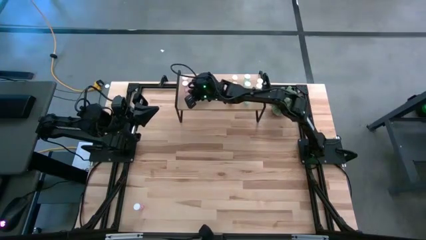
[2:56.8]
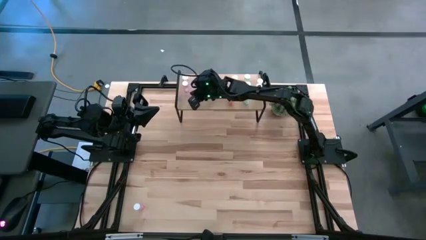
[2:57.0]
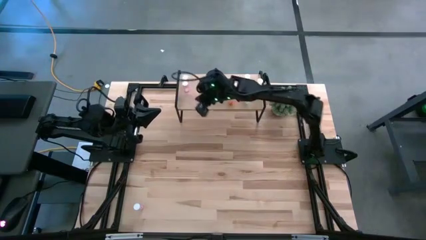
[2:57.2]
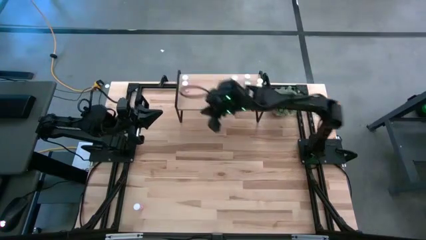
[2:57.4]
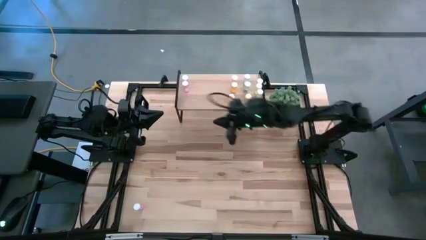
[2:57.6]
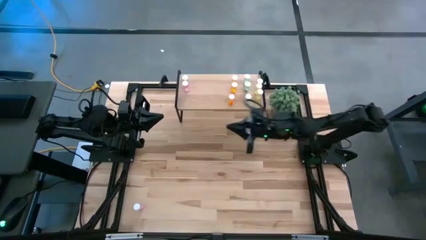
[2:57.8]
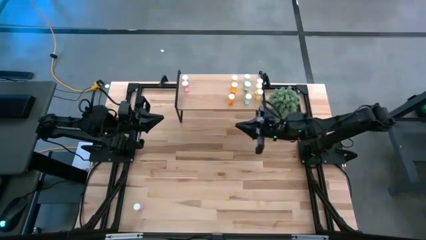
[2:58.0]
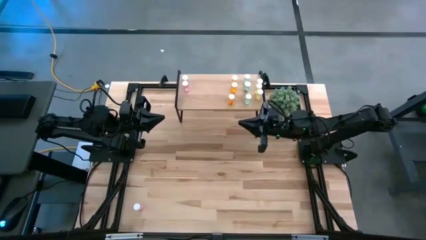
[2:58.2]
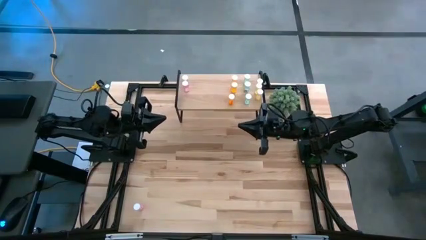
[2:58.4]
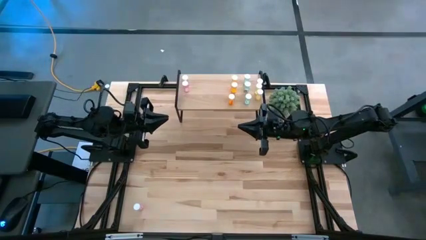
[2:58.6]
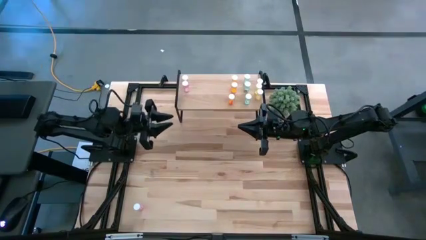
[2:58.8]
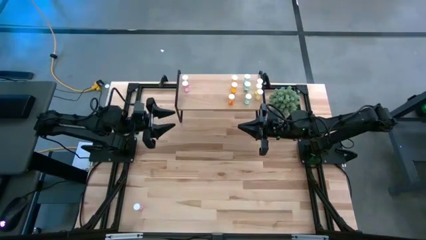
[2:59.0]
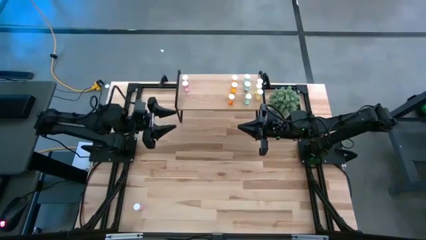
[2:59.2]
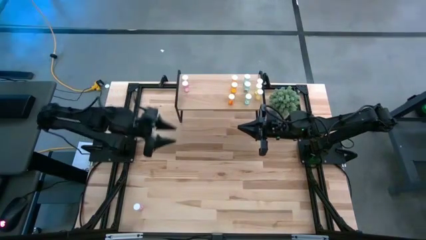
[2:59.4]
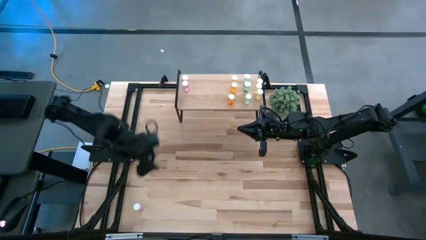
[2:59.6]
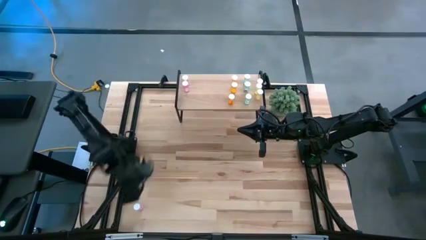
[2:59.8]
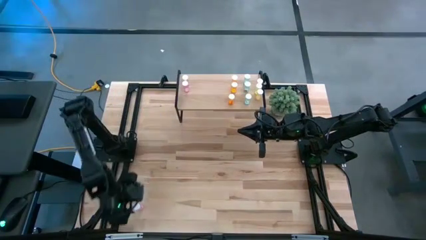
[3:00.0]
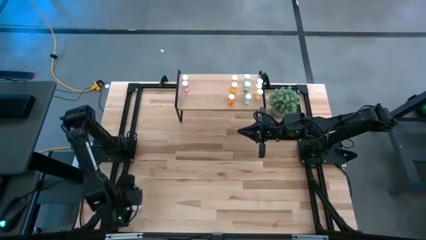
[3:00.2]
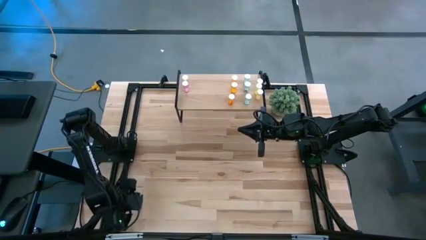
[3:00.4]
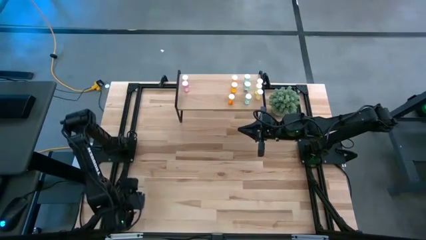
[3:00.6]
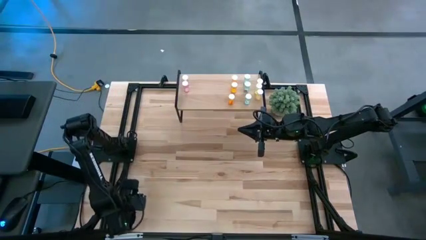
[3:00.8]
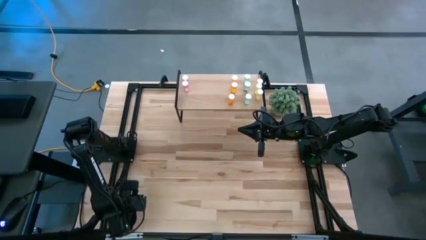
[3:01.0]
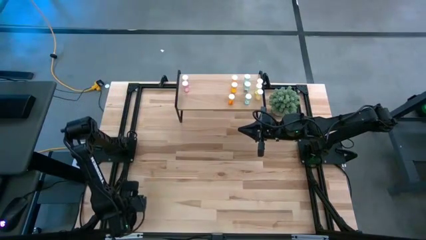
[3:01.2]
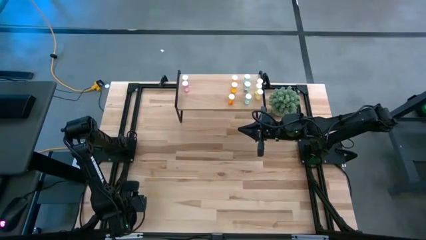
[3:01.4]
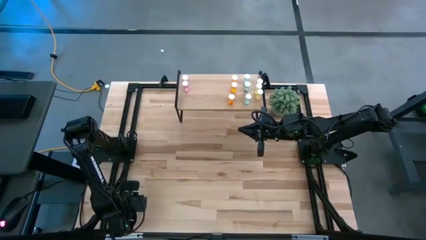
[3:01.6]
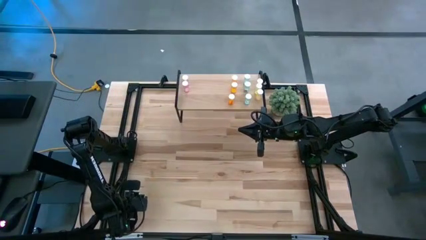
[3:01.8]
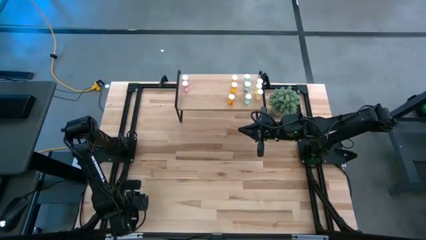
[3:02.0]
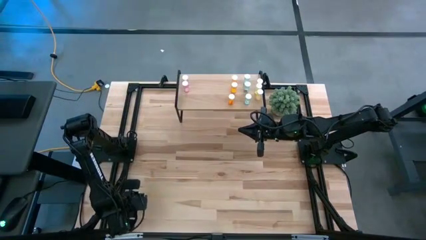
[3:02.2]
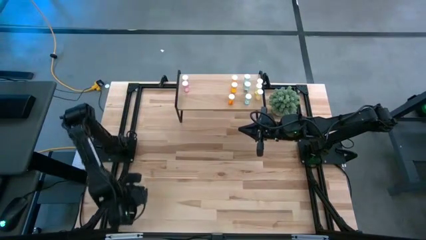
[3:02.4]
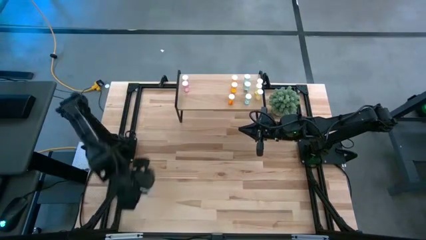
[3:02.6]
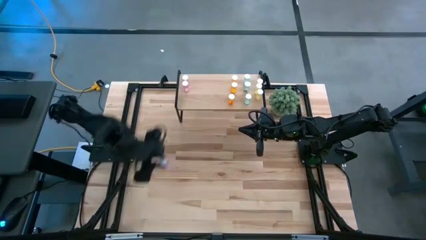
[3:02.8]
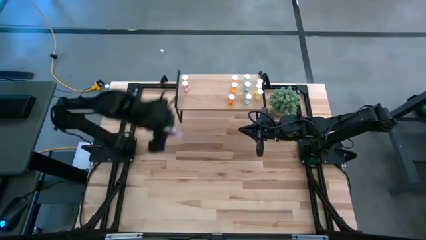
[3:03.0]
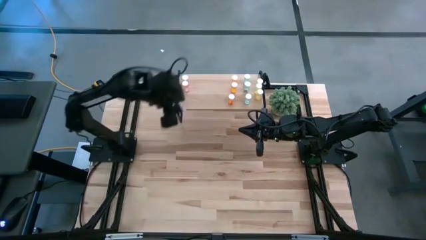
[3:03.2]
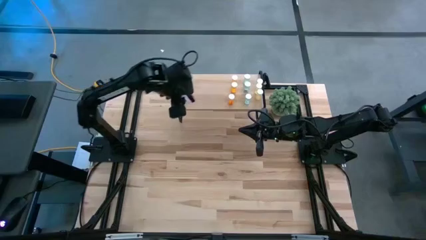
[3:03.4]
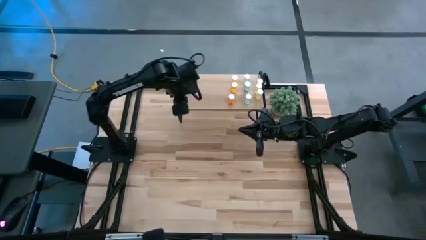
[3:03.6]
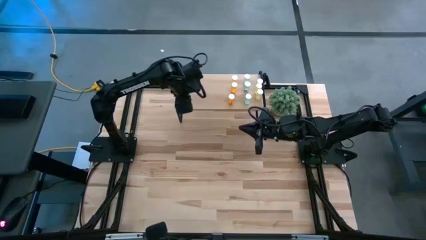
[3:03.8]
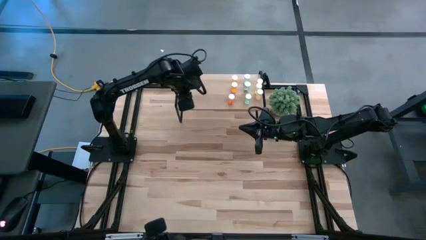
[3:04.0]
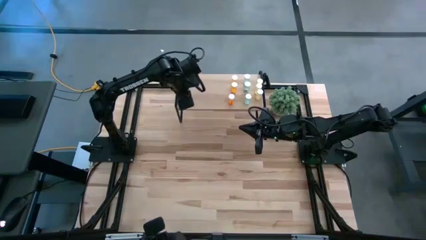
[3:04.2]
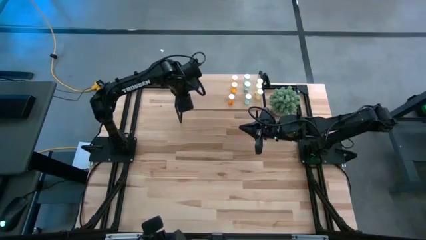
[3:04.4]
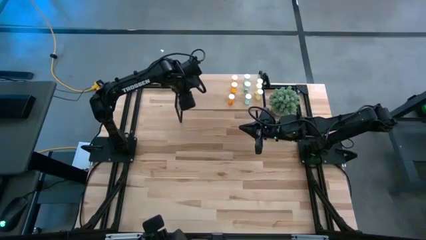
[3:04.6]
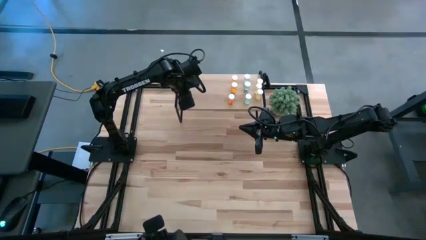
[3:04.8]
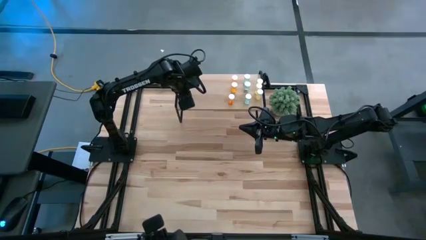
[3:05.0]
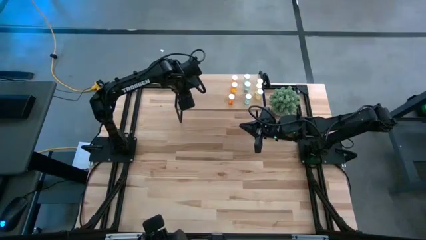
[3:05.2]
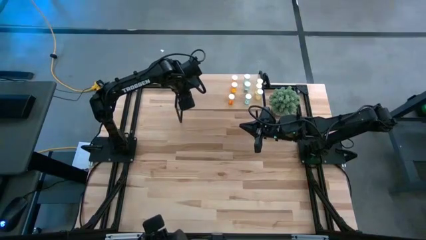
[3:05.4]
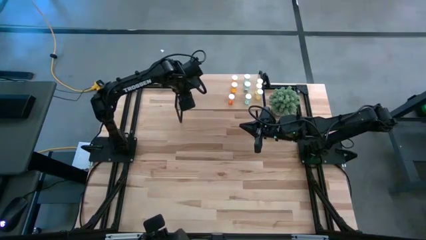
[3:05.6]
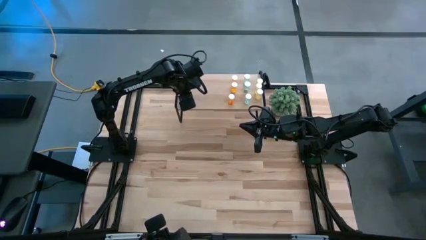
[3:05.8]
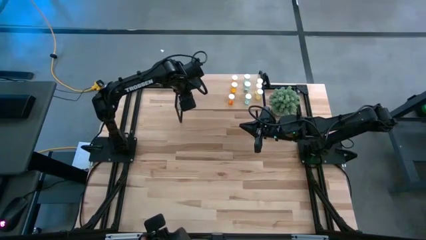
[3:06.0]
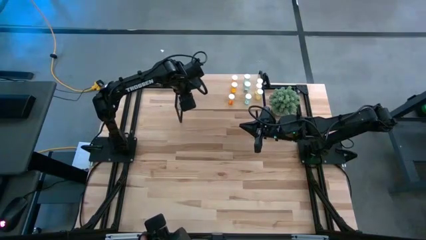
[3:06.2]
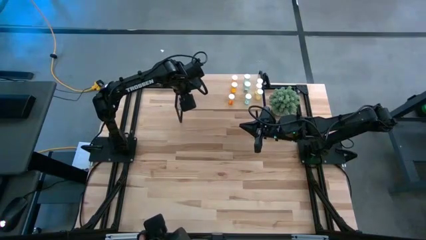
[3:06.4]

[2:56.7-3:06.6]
Task: Pick and place medicine bottles onto shelf by color
Put the pink pill bottle on the shelf aligned with the other pink pill bottles

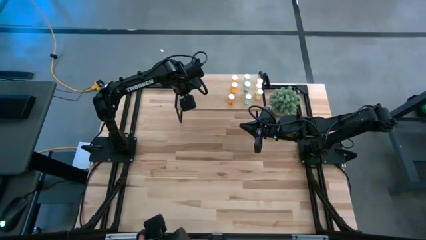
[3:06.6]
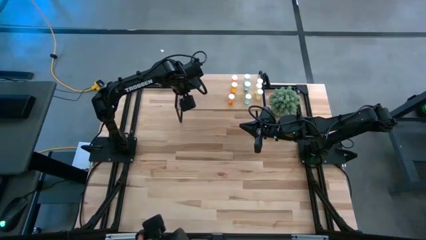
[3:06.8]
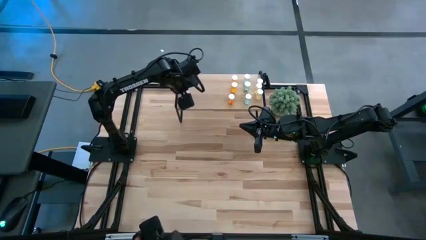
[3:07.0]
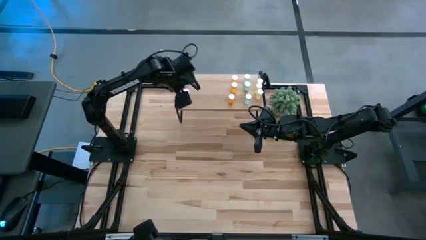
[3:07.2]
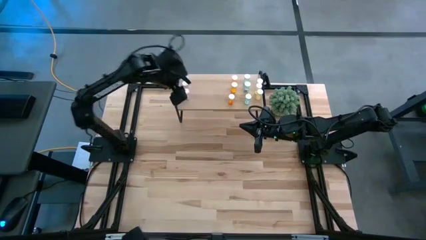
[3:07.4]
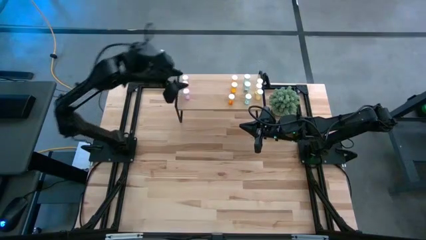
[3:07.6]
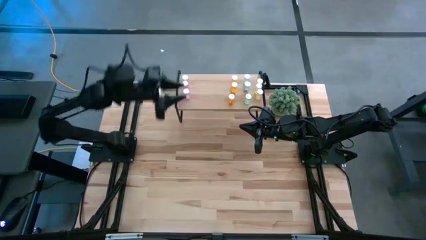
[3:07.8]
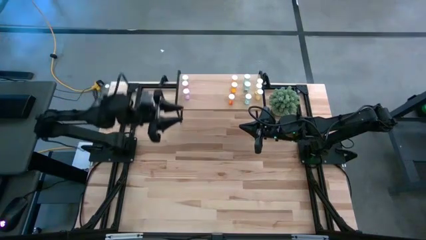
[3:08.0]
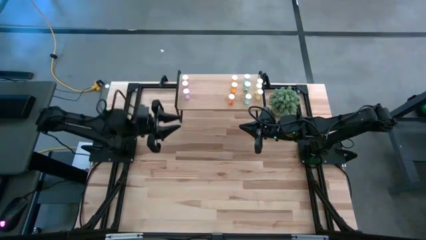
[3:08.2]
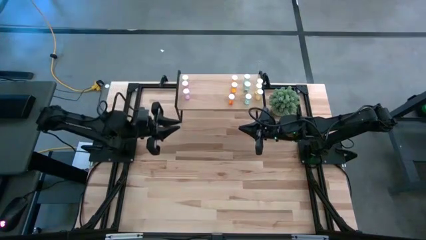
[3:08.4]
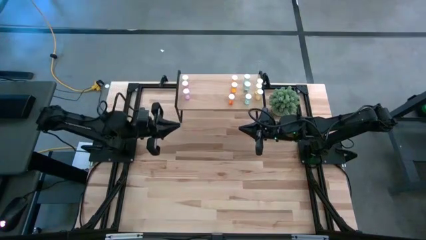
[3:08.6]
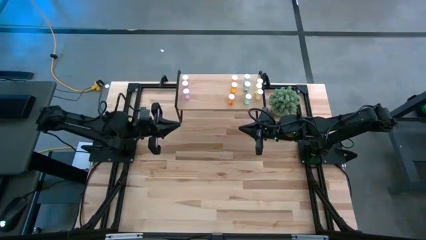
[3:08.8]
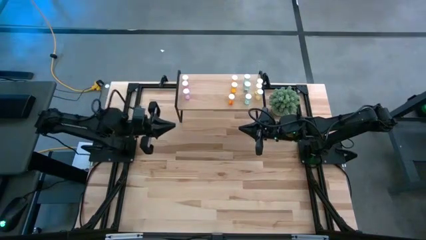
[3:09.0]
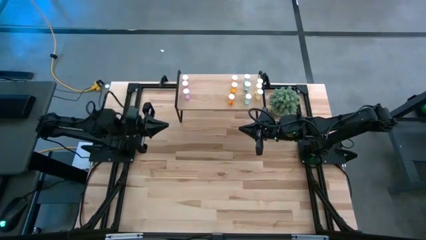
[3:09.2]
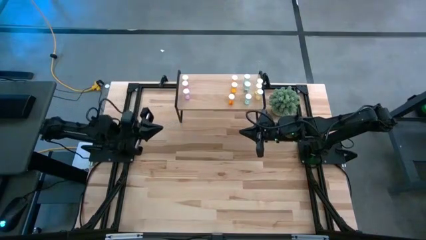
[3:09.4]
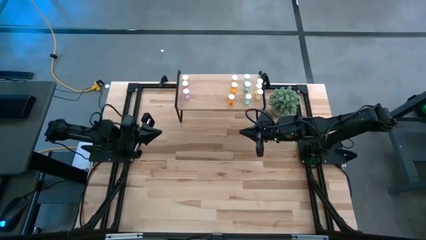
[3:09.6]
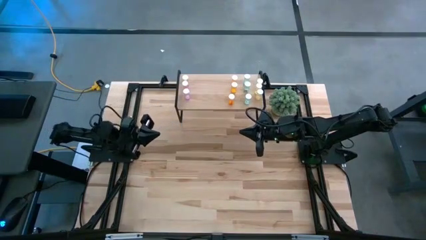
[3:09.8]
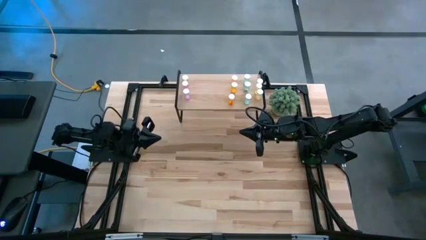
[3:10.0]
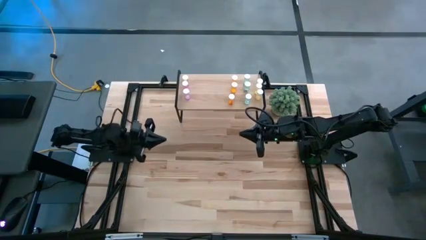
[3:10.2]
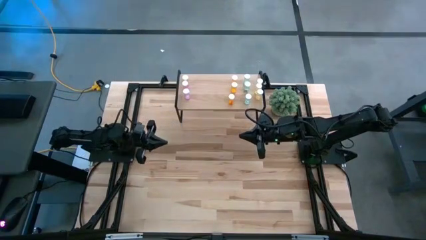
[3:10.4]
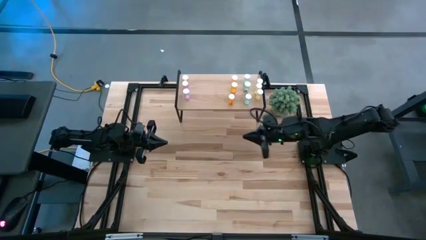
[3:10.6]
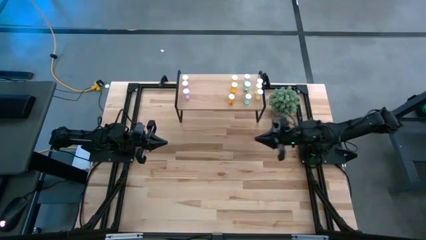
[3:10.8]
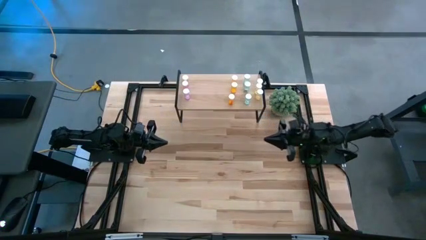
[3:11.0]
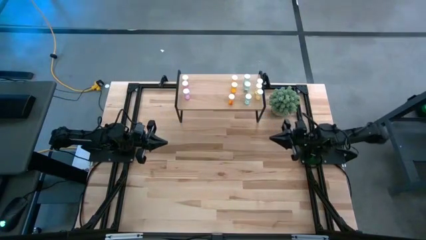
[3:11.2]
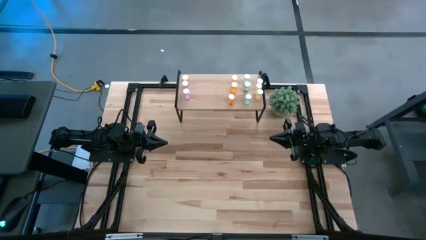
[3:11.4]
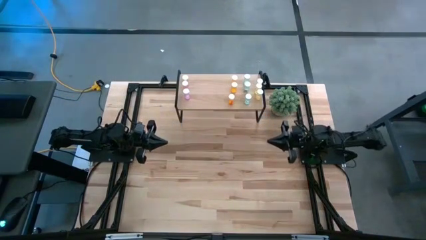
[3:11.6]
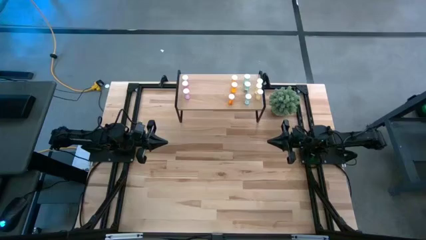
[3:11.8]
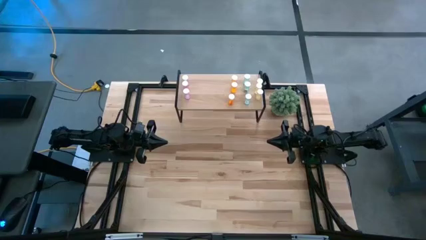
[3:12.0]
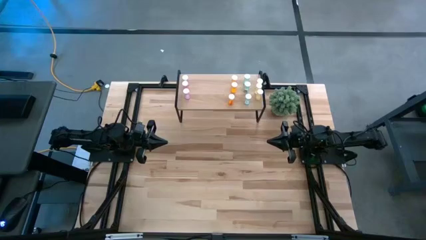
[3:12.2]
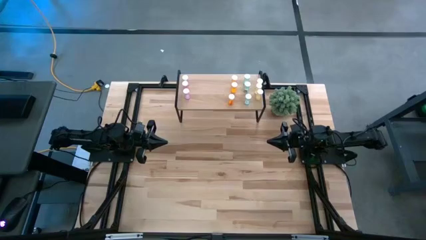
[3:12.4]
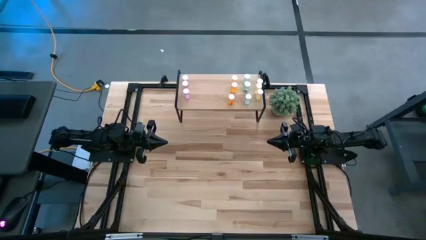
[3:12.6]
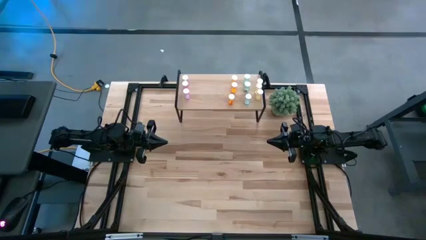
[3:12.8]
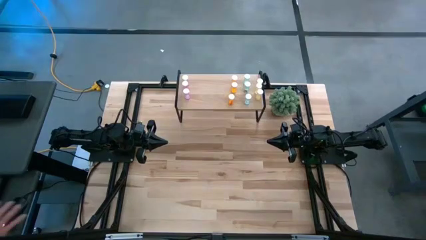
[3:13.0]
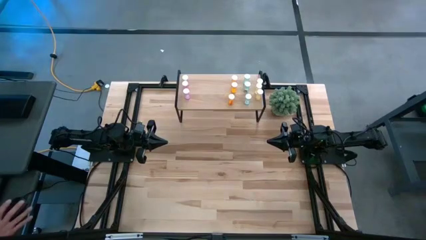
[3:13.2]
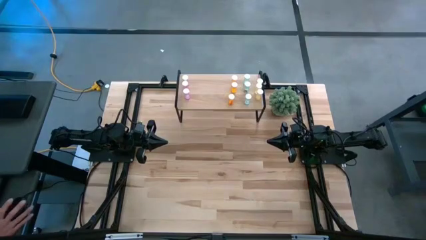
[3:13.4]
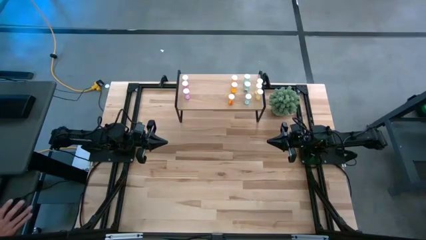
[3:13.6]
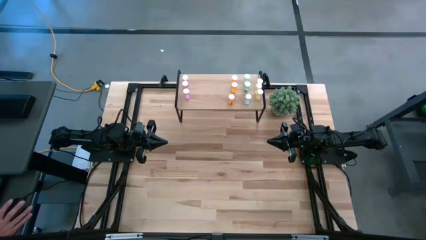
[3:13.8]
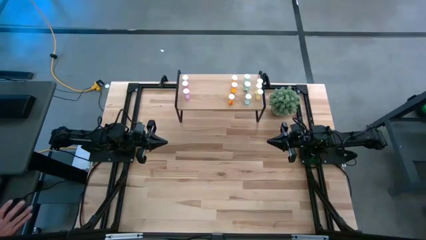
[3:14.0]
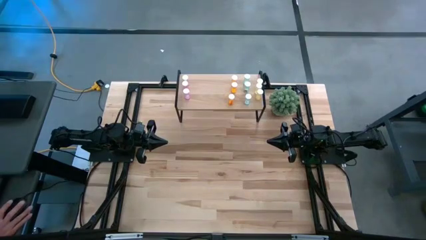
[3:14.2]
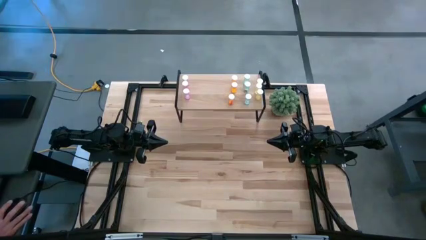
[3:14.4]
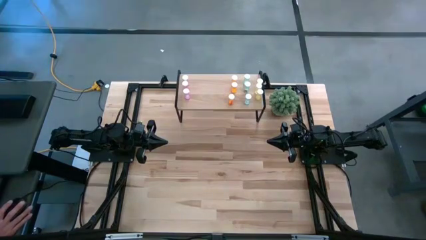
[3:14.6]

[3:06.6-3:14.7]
Return to home position
